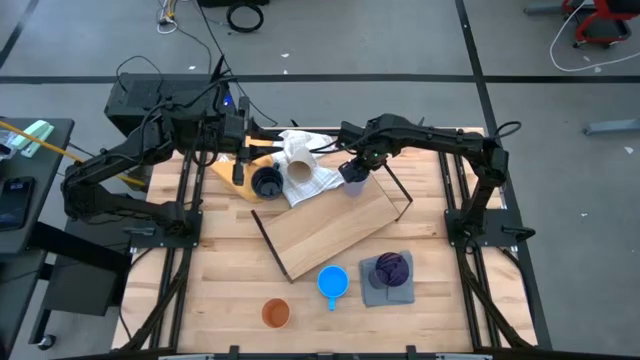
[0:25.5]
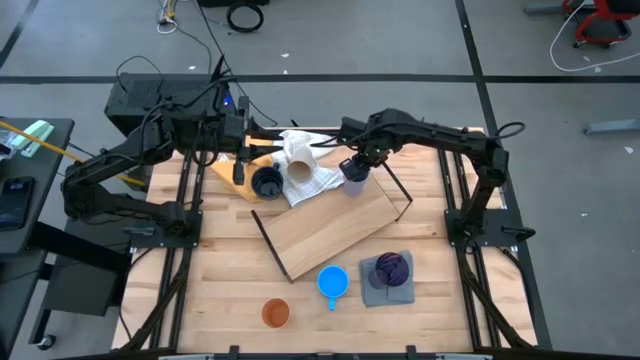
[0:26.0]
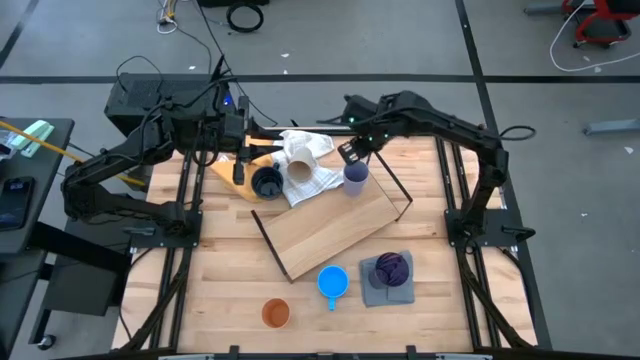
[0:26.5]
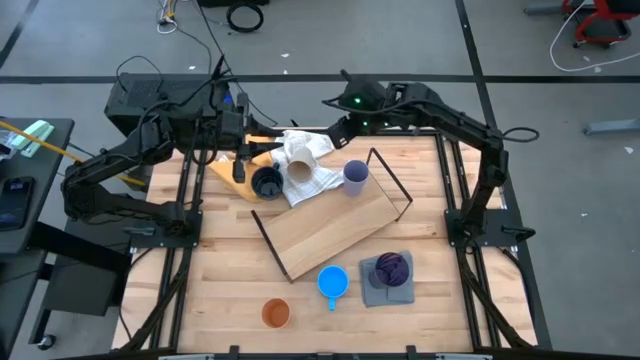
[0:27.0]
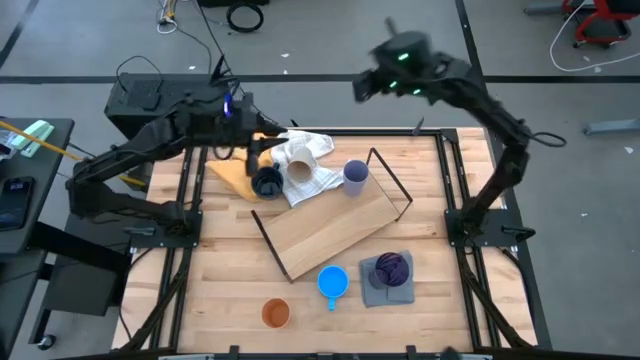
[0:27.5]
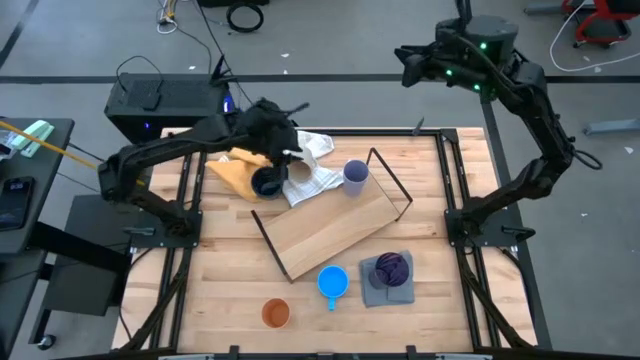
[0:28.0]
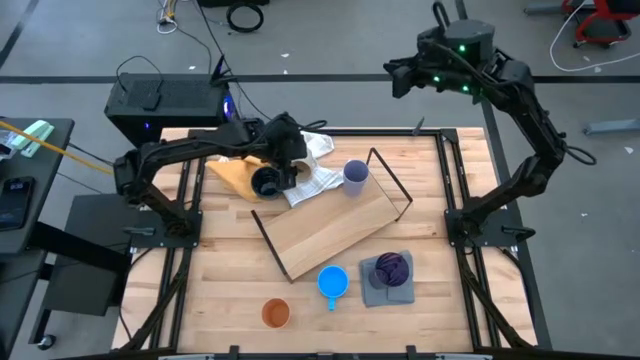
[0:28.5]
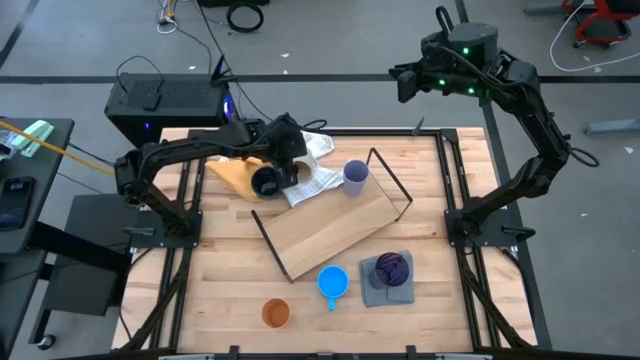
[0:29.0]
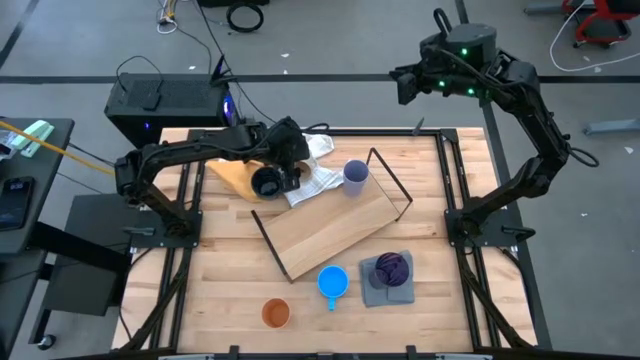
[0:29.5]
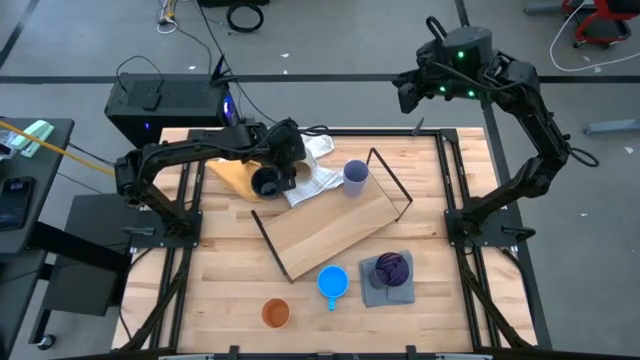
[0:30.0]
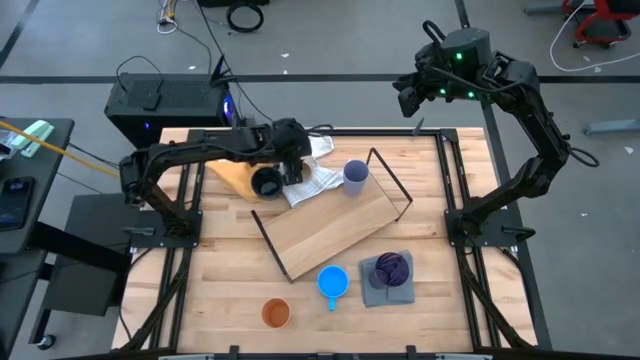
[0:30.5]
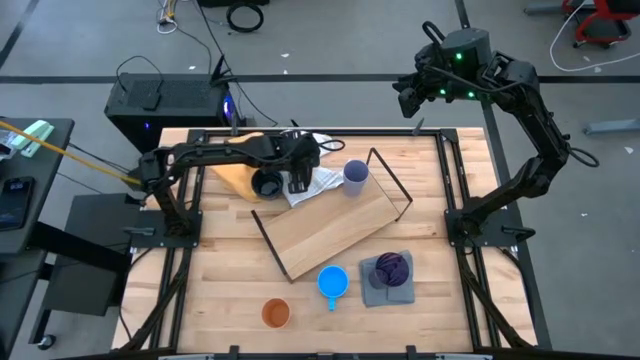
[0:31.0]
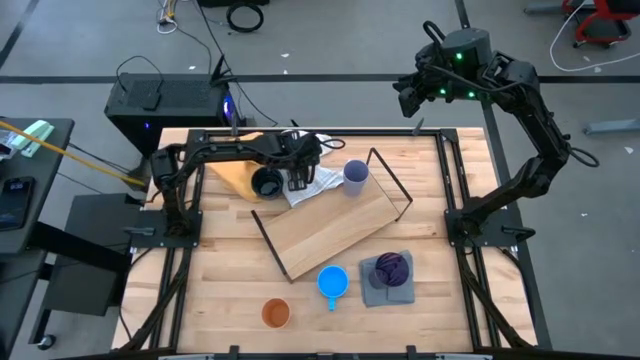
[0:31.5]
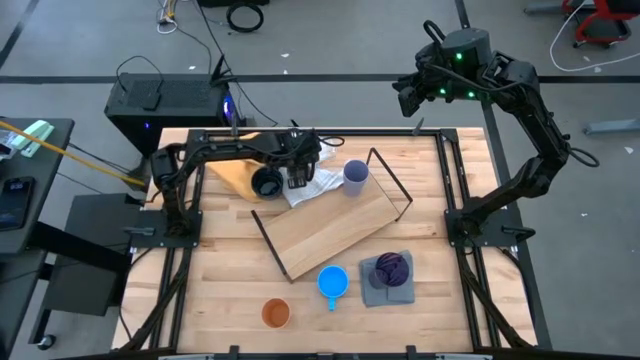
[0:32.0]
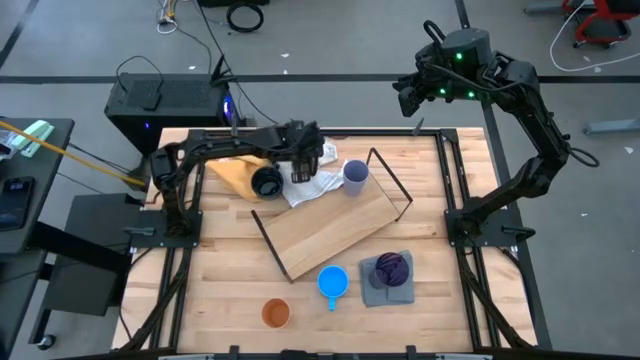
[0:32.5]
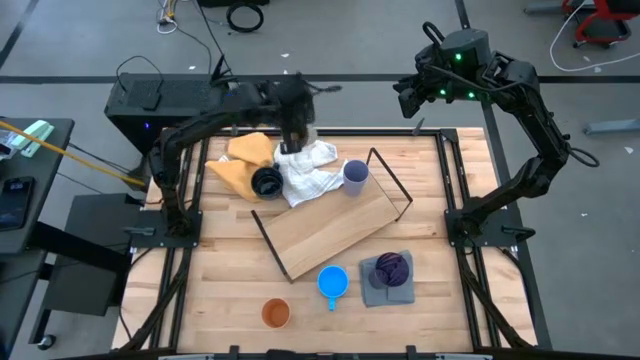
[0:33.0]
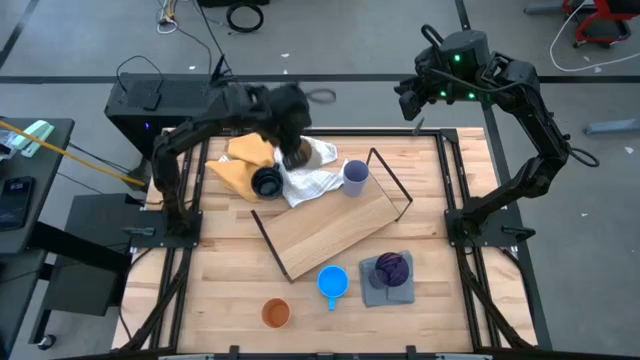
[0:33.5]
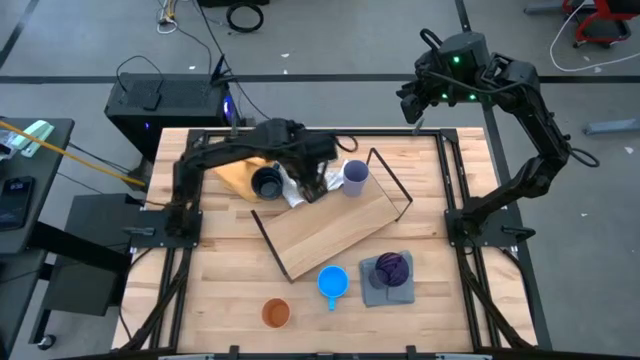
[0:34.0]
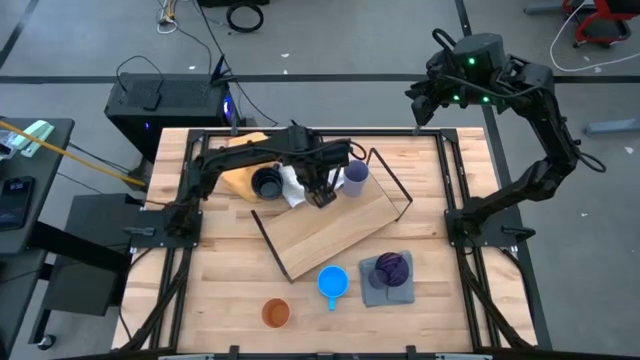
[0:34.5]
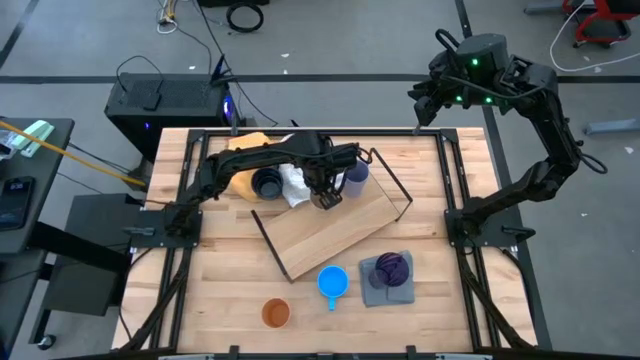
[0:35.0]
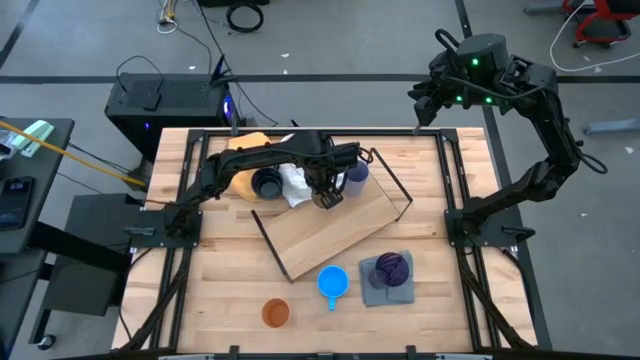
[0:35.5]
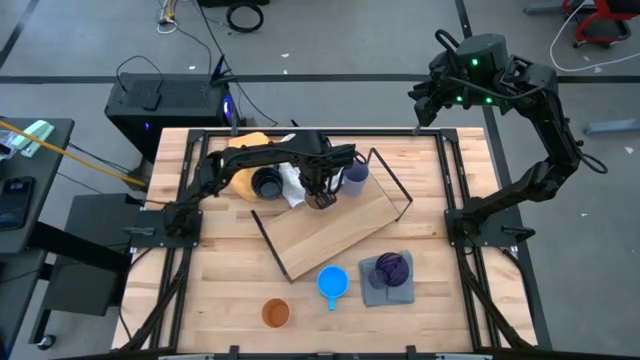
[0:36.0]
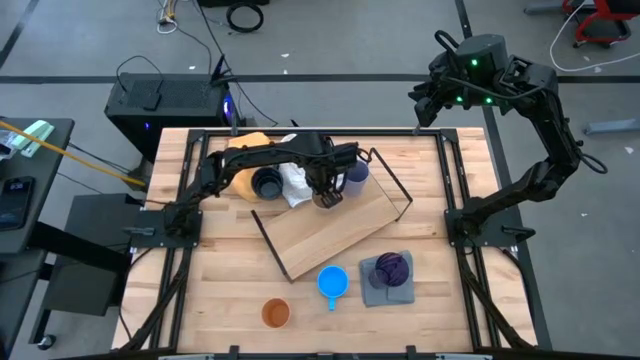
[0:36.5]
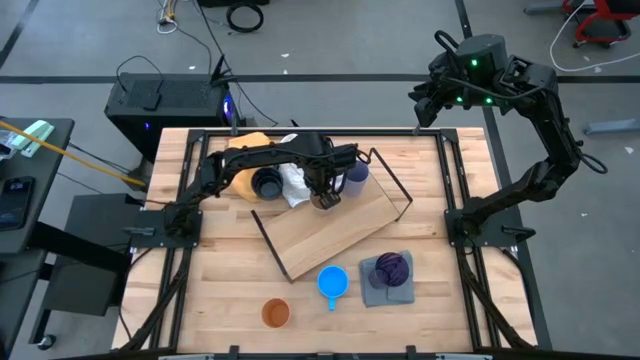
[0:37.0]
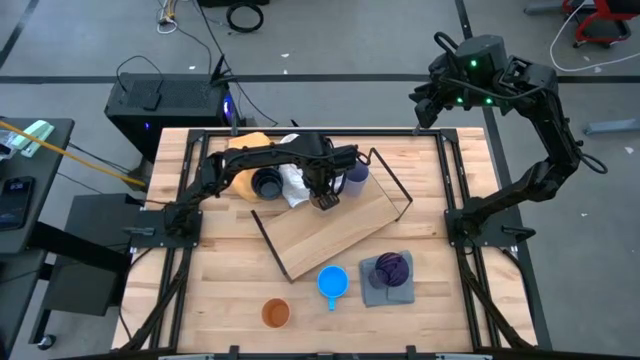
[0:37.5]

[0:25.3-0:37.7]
Task: Stack small to large cups/mugs on shelf
Put the white cup on the shelf

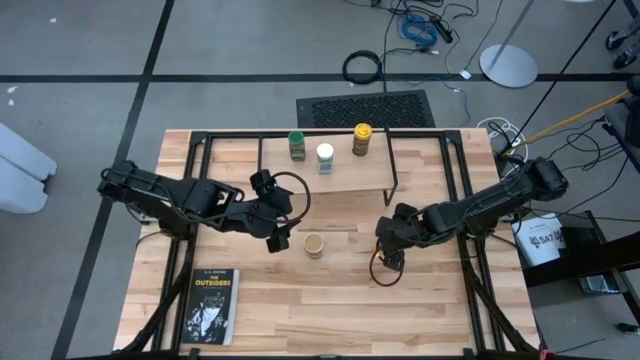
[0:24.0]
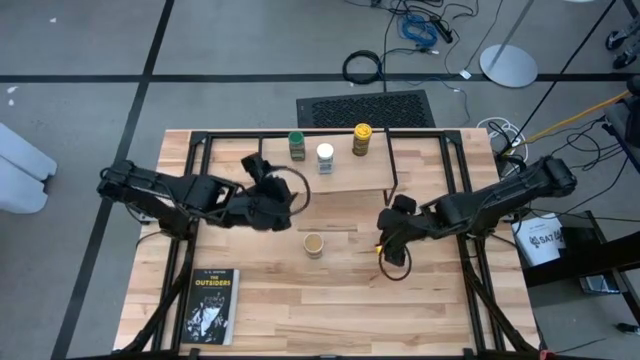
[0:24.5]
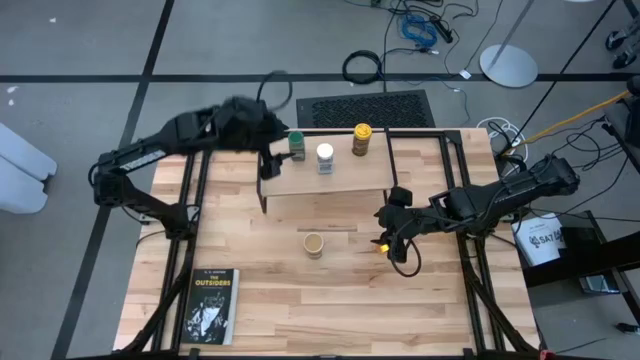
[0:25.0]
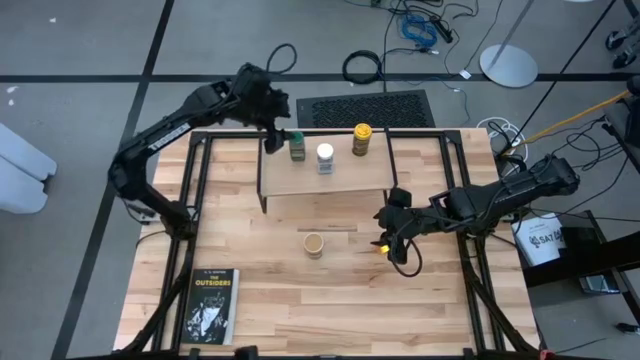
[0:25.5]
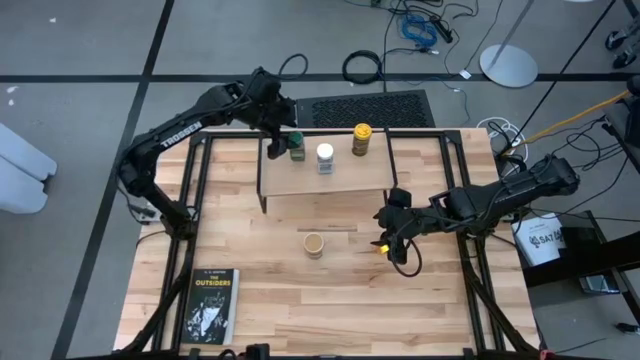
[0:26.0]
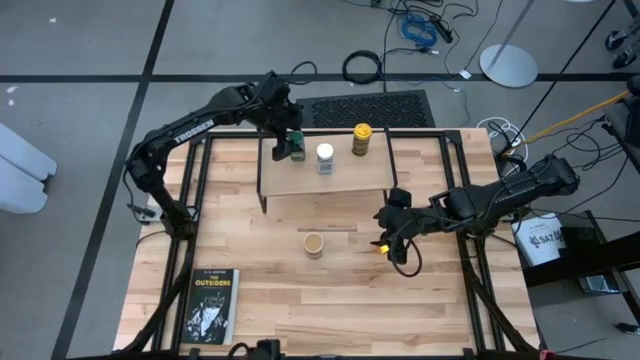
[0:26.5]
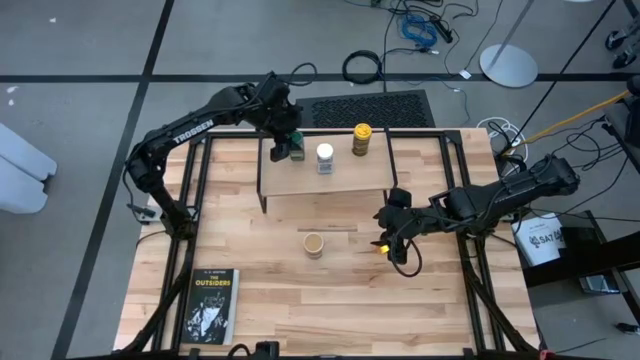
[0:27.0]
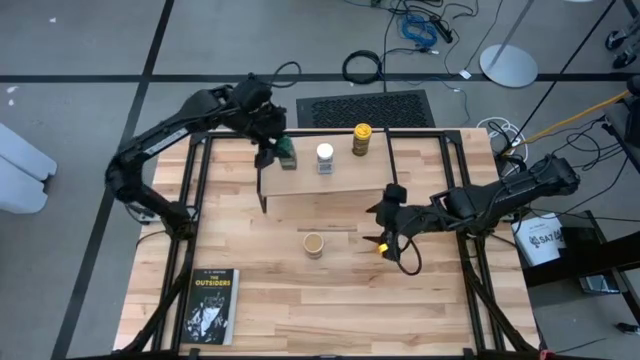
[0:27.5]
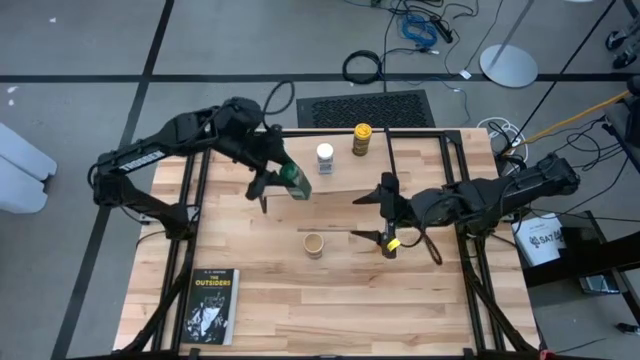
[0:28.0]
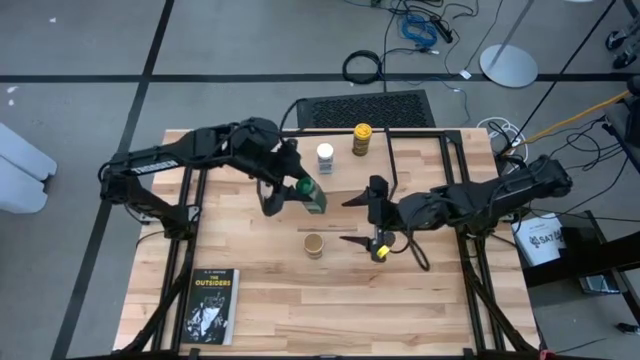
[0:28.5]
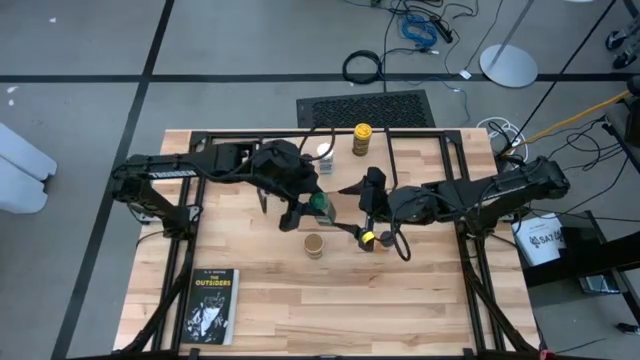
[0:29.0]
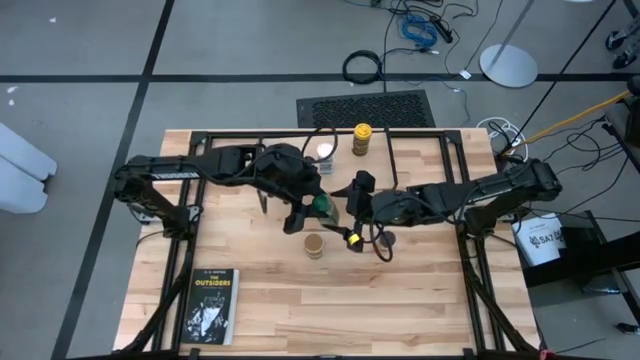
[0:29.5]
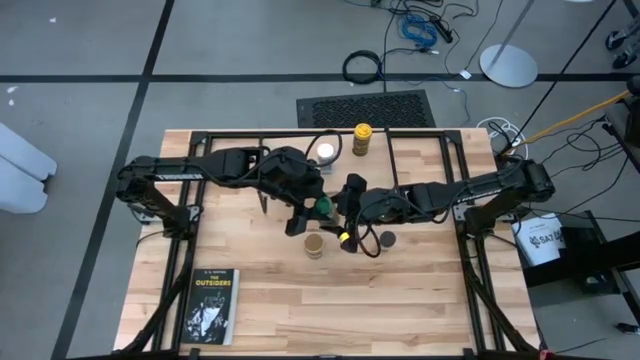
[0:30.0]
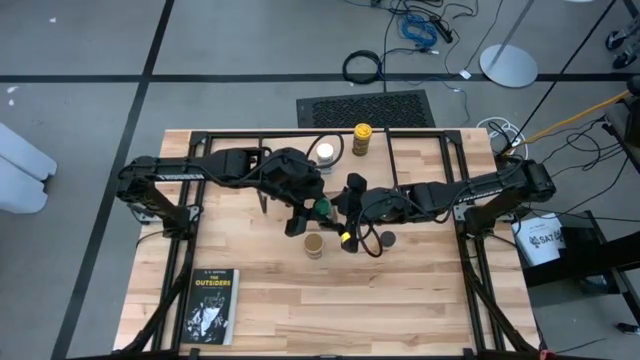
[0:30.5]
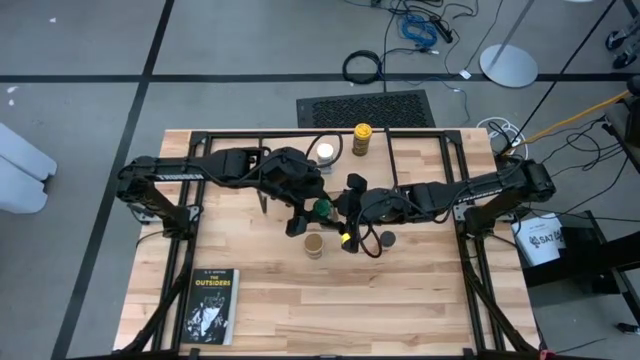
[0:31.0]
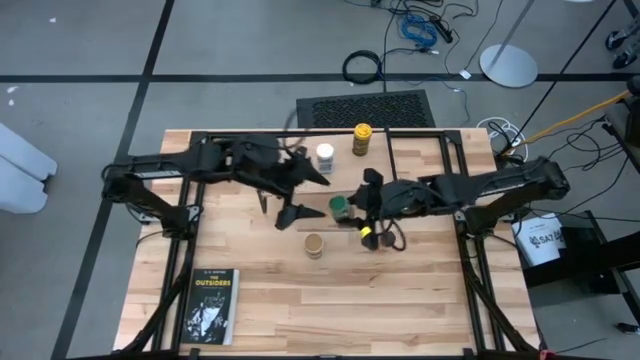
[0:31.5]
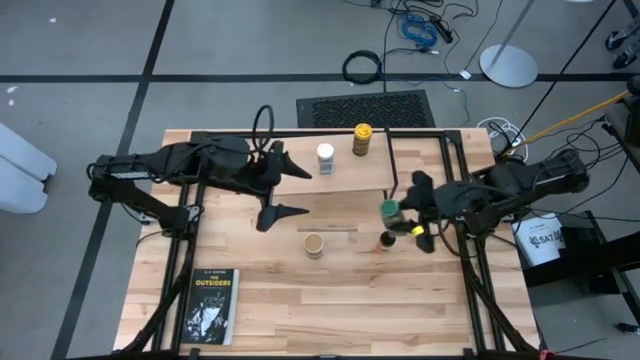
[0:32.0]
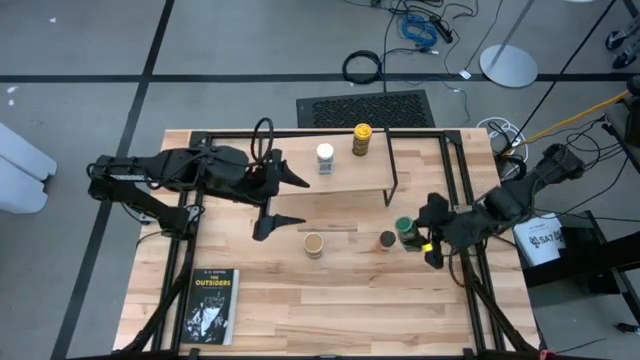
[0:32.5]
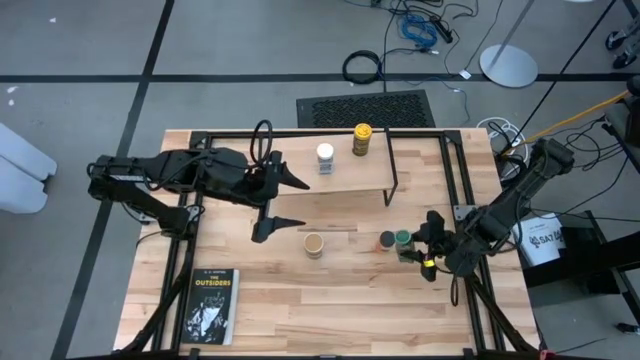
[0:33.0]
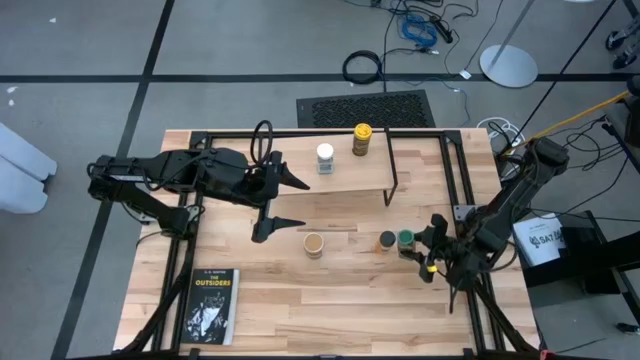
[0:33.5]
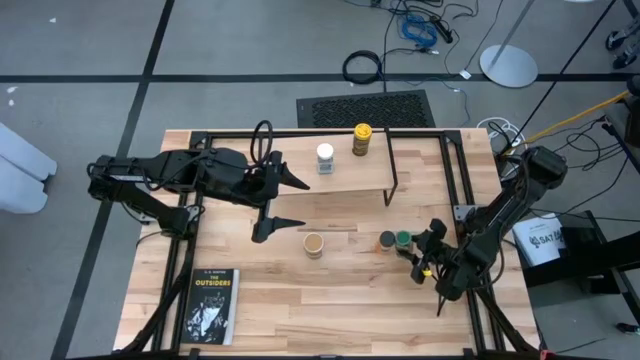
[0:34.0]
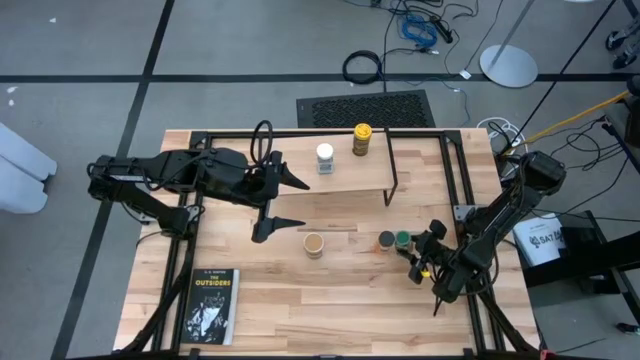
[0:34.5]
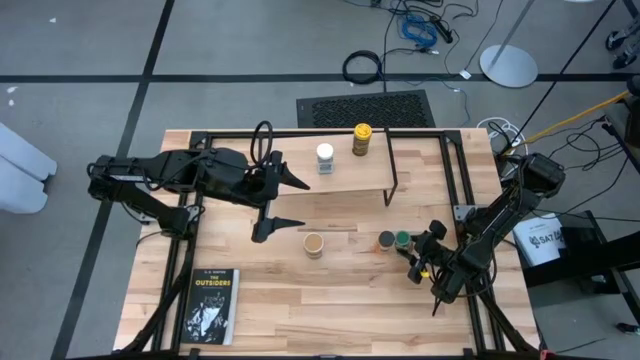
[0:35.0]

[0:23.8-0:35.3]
Task: Shelf spices
Remove the green seasoning bottle from the shelf
